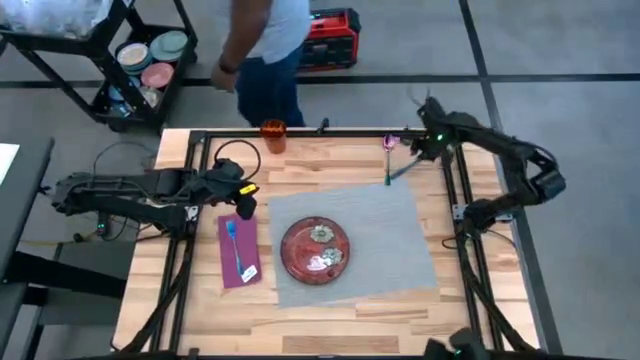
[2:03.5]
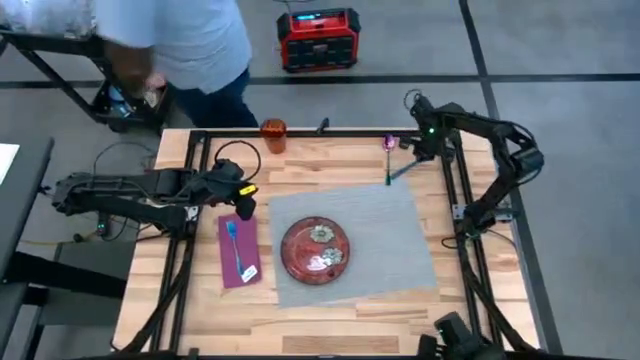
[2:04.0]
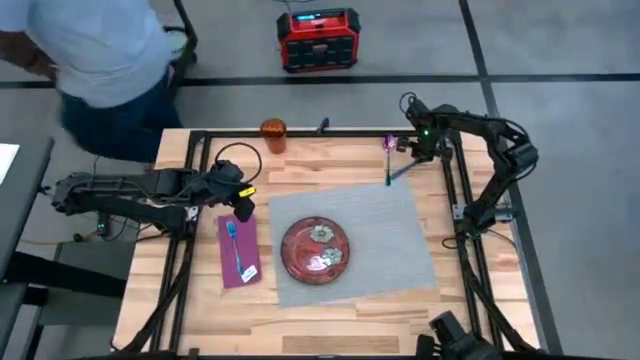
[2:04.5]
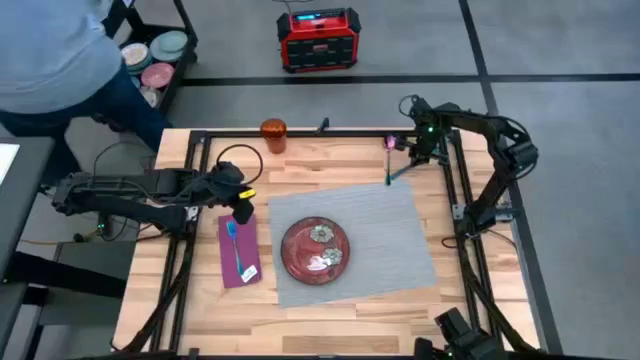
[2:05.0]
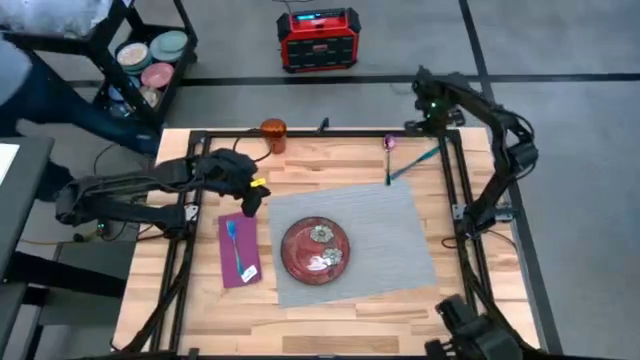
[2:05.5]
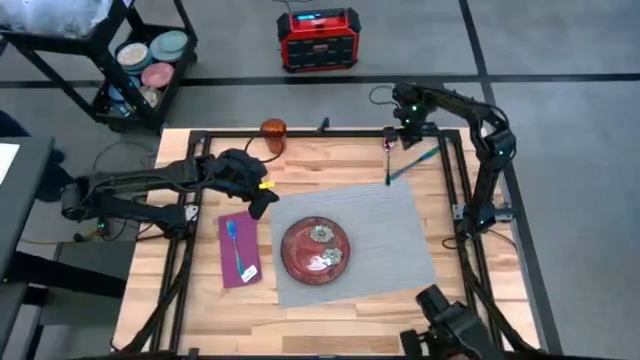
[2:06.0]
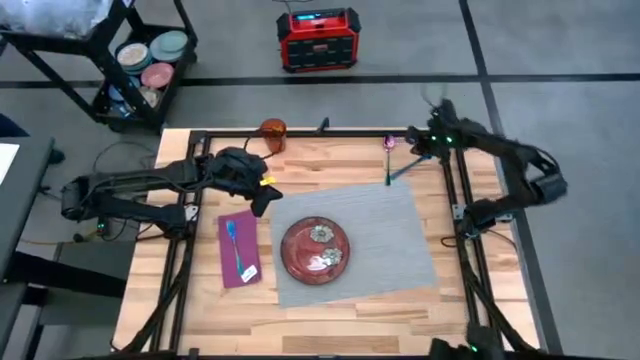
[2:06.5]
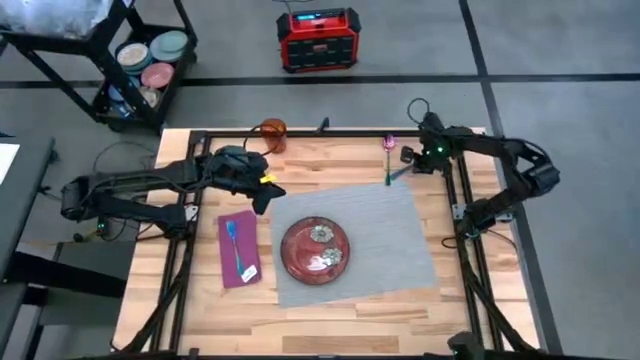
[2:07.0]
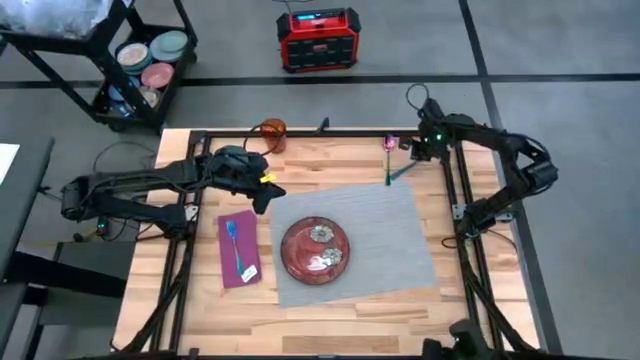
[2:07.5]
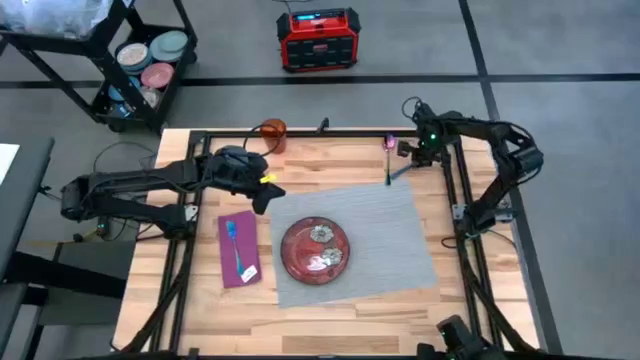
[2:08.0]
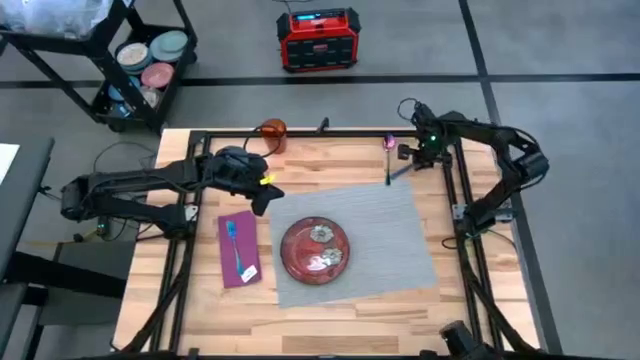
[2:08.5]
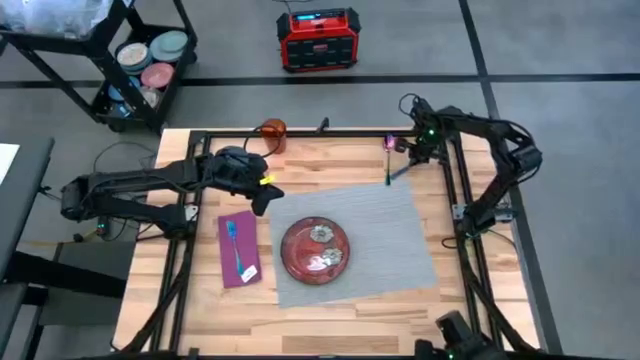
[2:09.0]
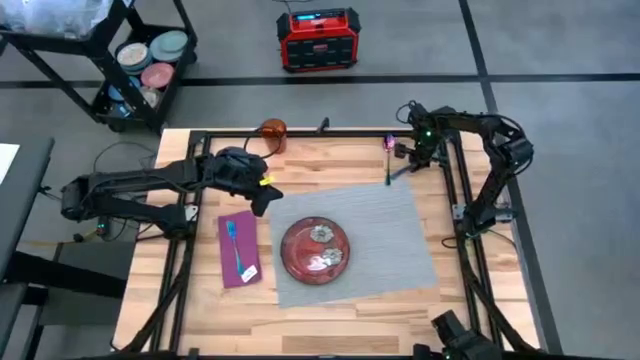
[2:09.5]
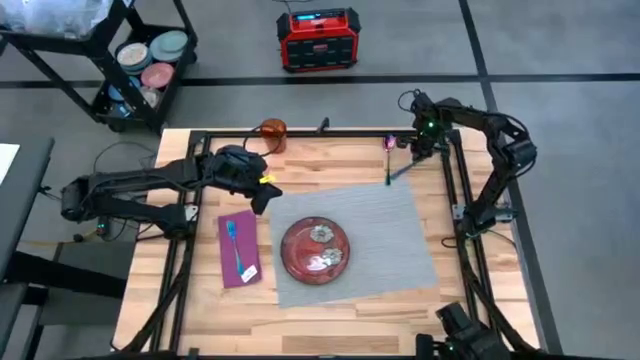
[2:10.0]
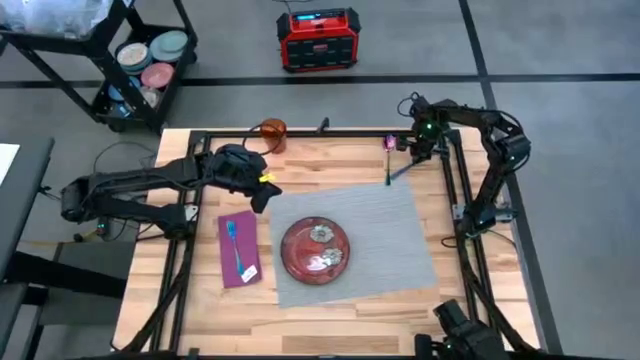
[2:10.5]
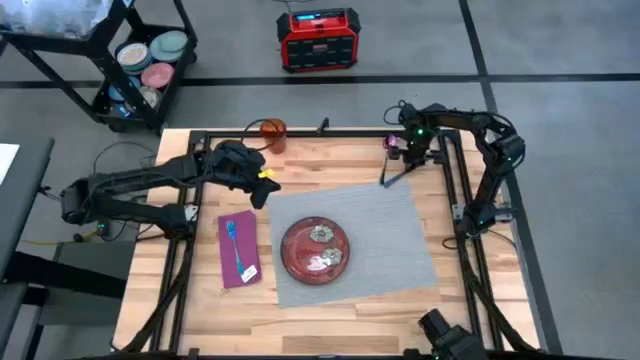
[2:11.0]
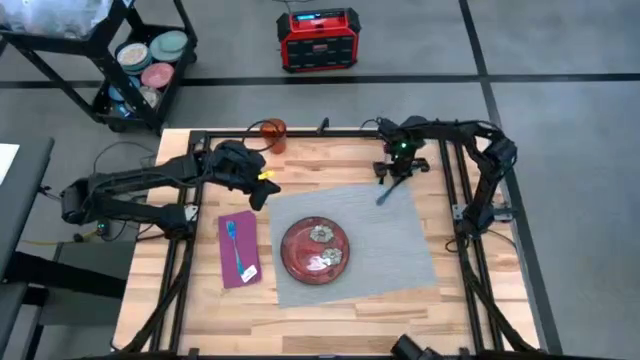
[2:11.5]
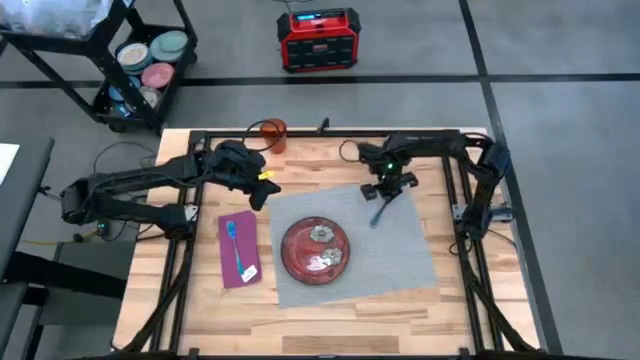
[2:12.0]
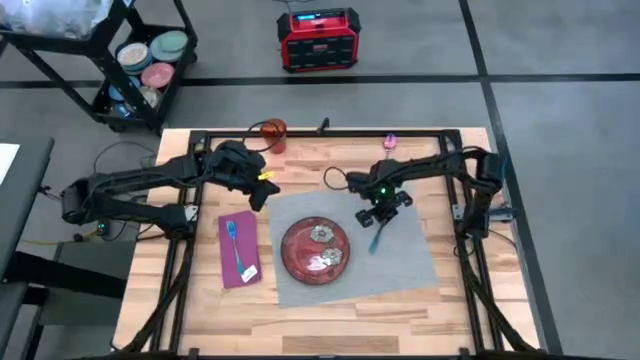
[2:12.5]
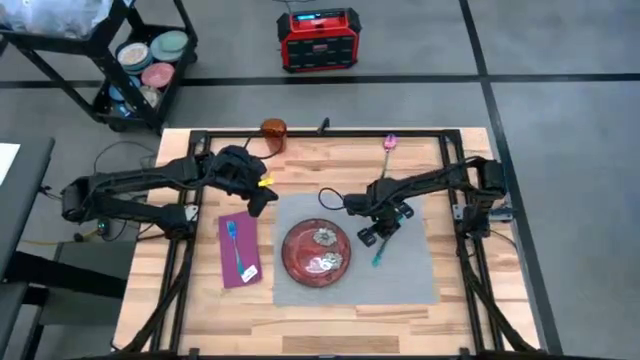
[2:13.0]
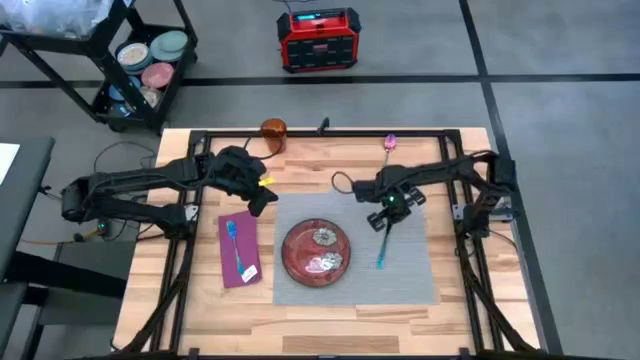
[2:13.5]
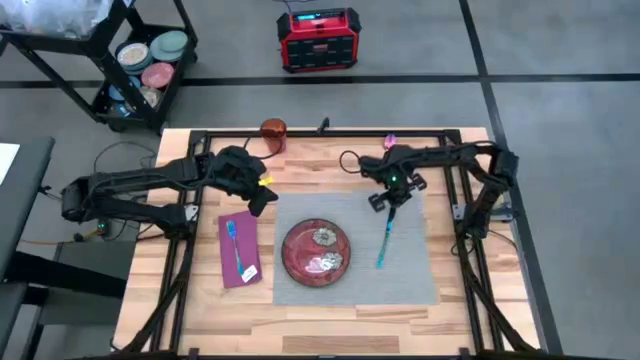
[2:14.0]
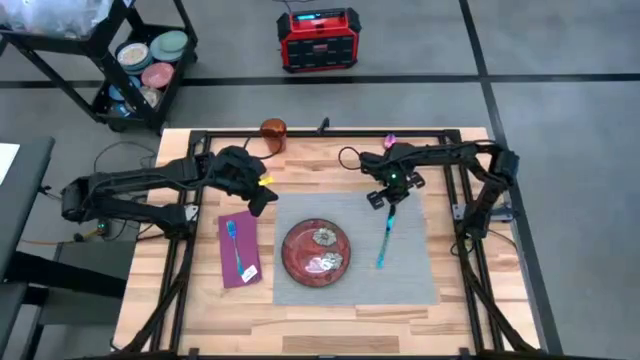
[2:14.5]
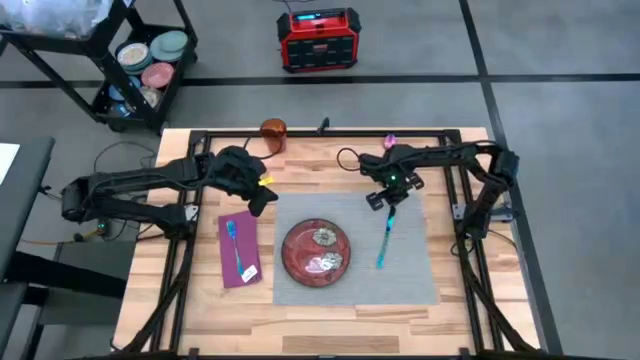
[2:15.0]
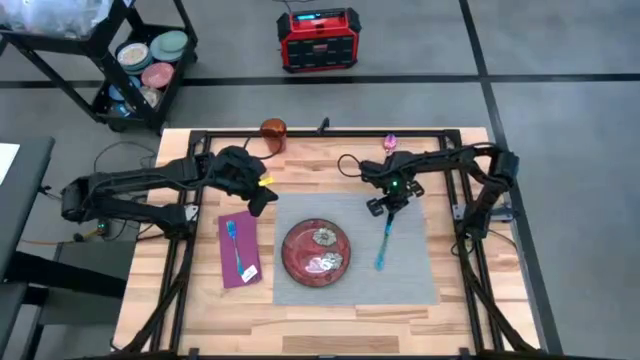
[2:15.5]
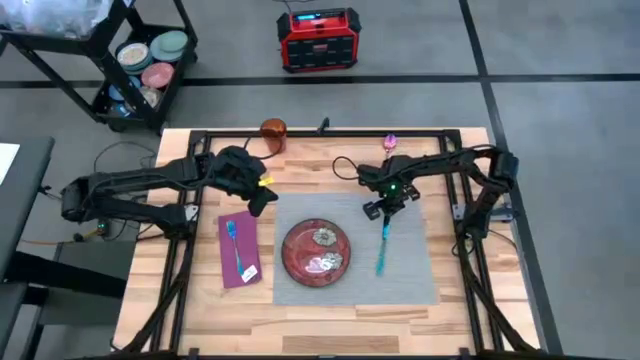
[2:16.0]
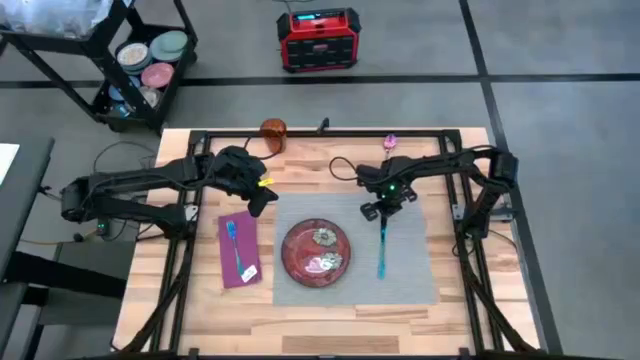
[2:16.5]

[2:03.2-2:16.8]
Task: Set table place
Put the blue table knife on the gray placemat to the right of the red plate

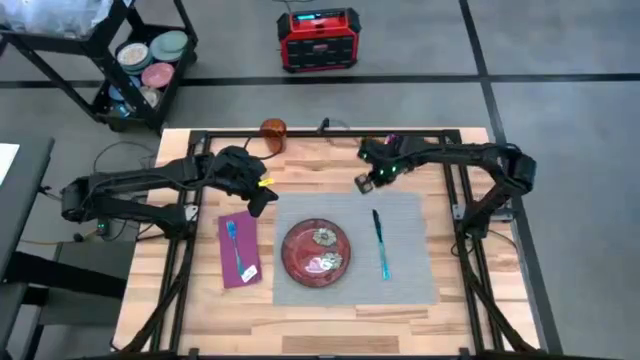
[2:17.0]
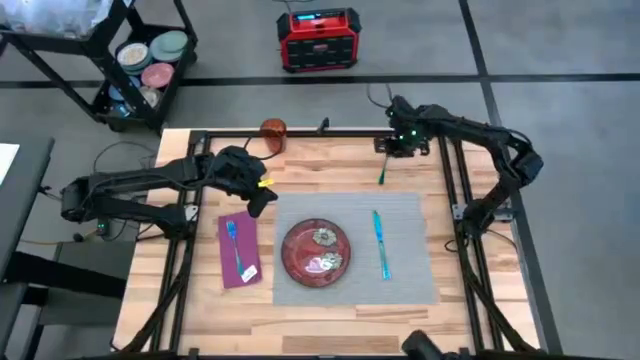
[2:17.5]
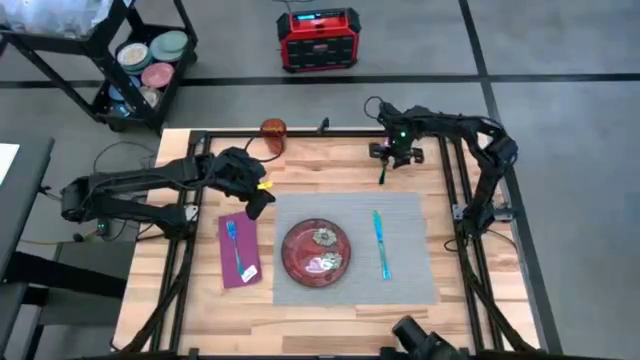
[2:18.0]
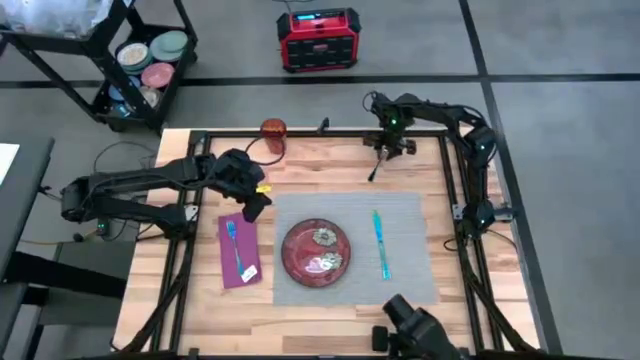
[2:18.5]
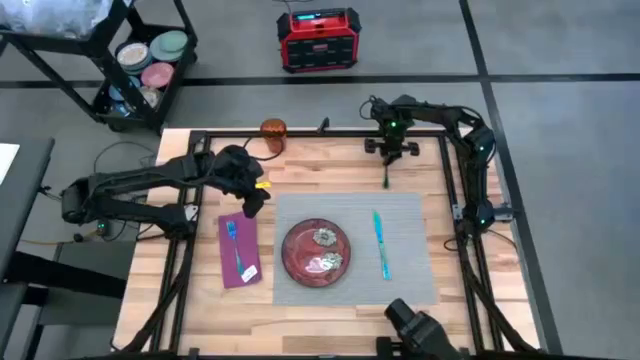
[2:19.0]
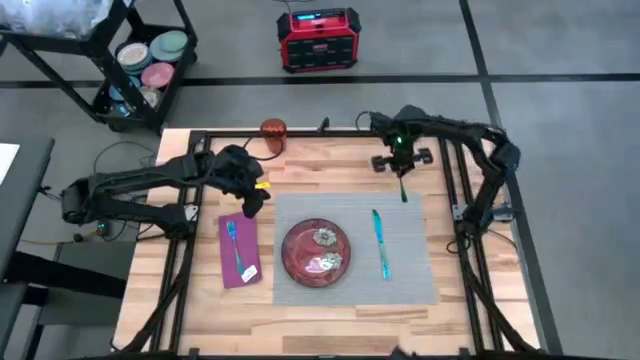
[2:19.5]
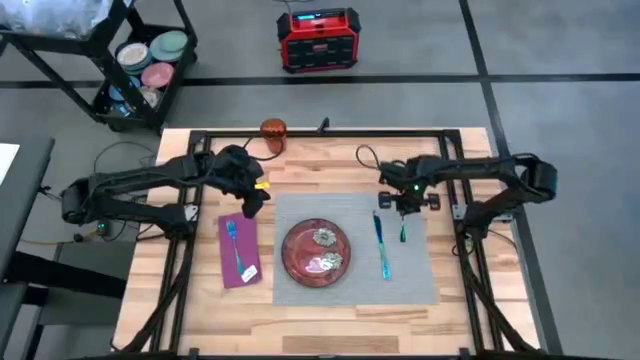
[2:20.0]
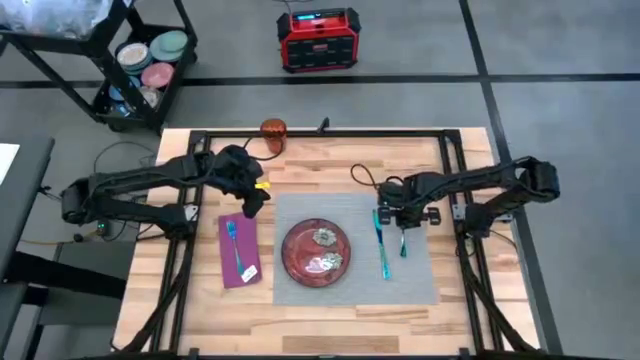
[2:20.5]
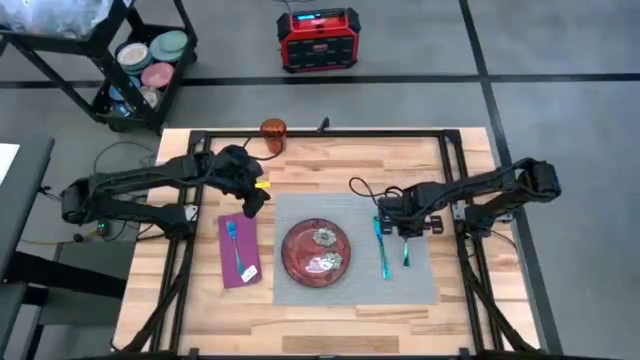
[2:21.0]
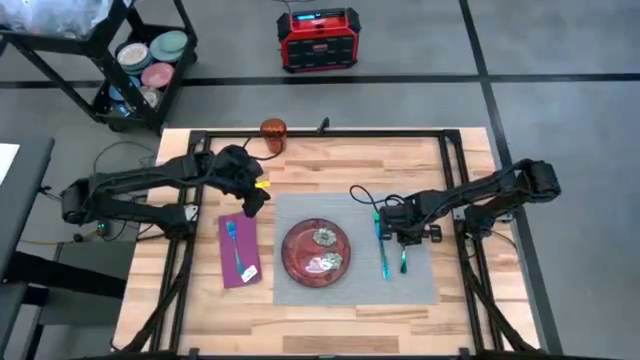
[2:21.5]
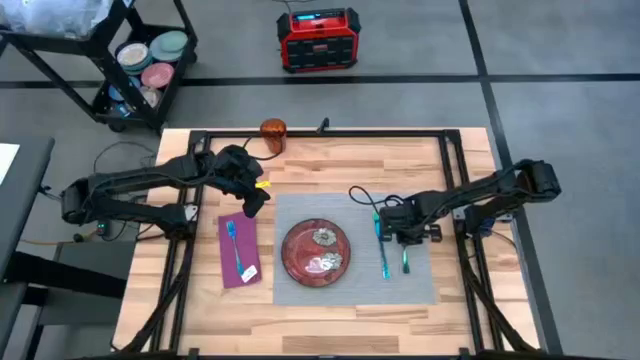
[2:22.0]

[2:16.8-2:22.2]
Put the blue spoon on the gray placemat to the right of the blue table knife

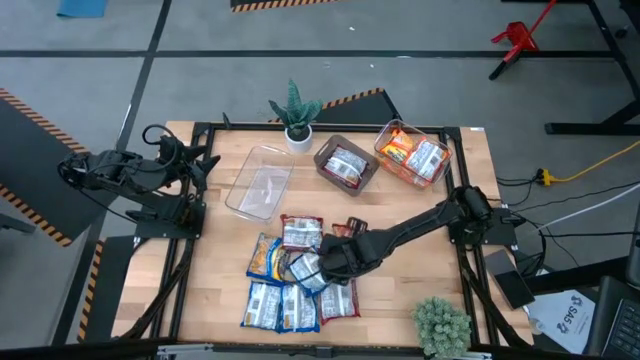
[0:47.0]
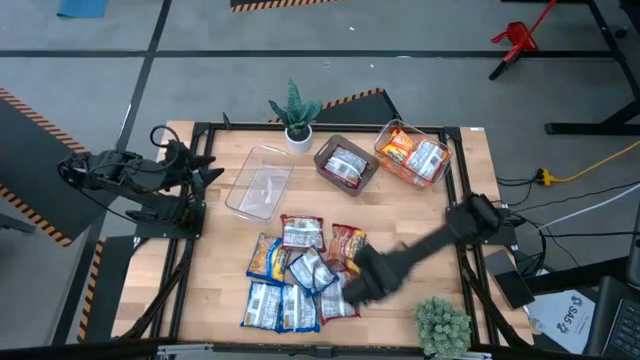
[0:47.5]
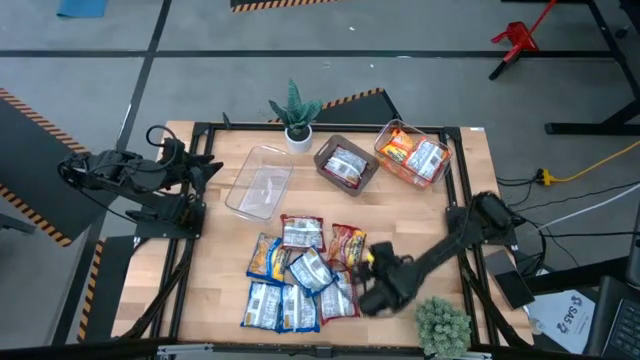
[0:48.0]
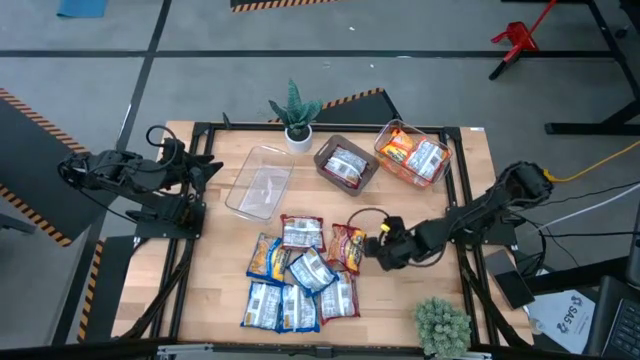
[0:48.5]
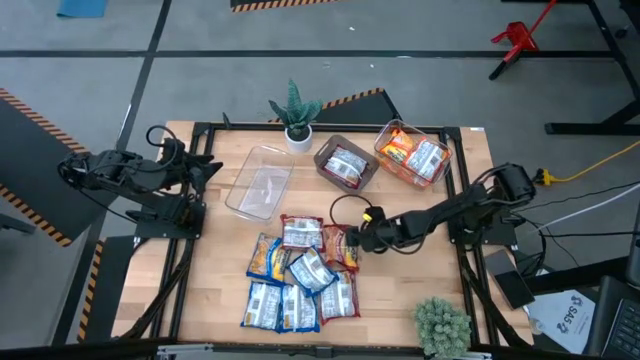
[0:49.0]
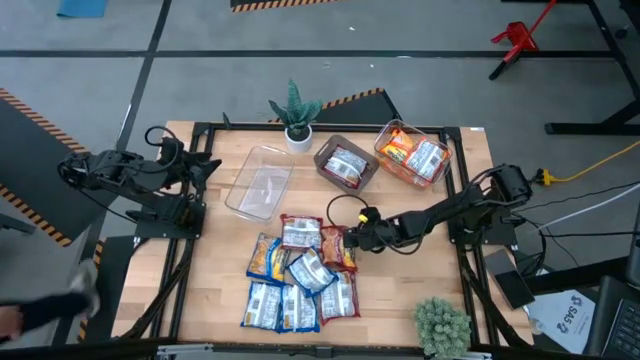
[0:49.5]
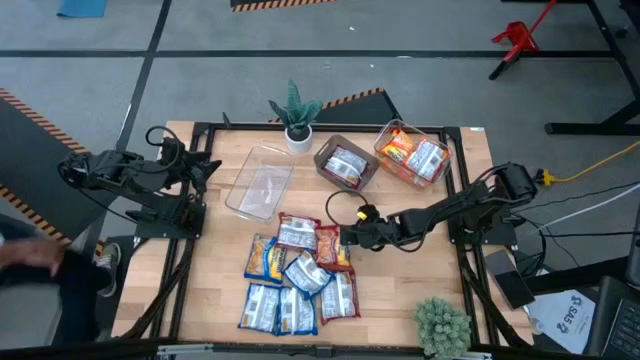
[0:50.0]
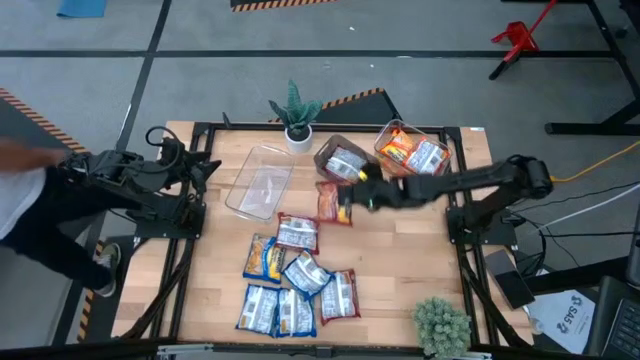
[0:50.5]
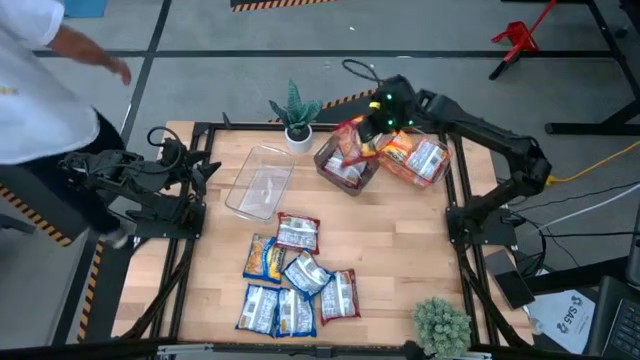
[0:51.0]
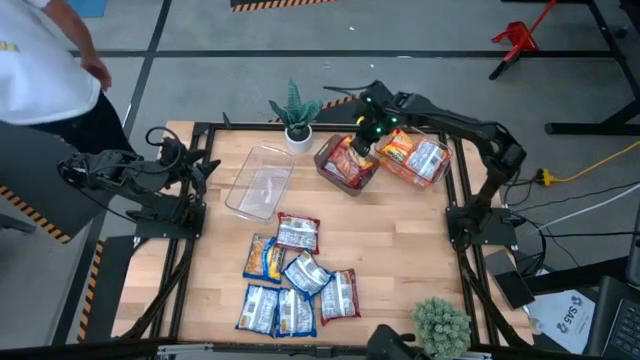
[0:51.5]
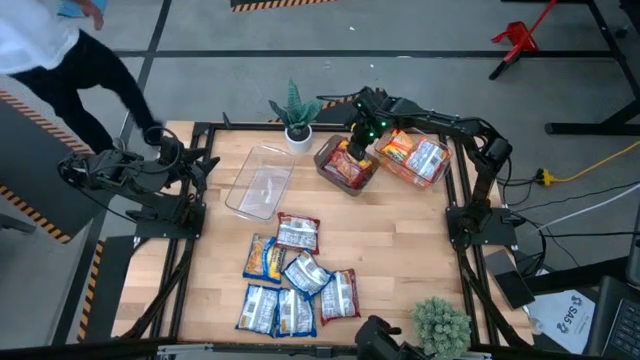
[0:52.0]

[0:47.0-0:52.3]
Task: Sort Maruchan noodles
Put the red noodle pack into the black bin
